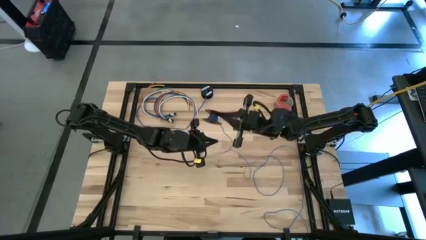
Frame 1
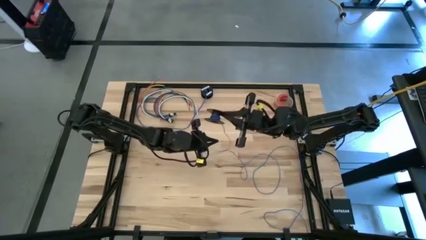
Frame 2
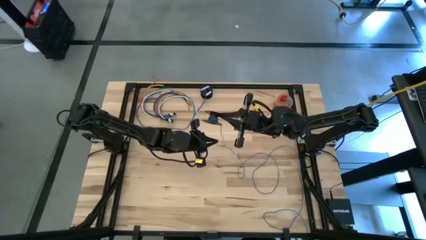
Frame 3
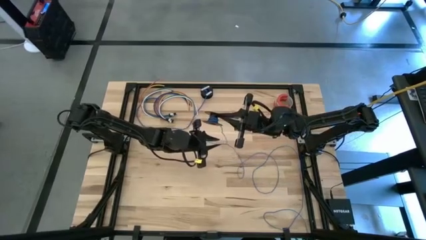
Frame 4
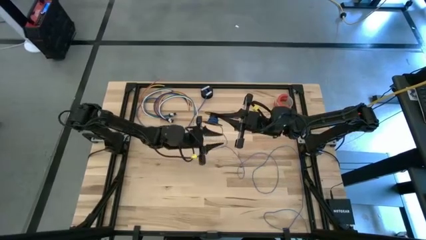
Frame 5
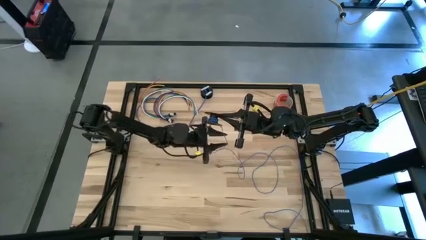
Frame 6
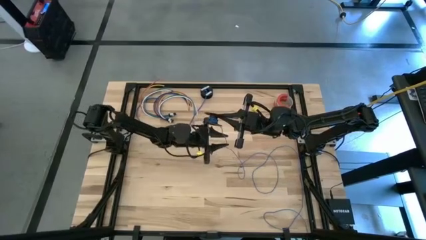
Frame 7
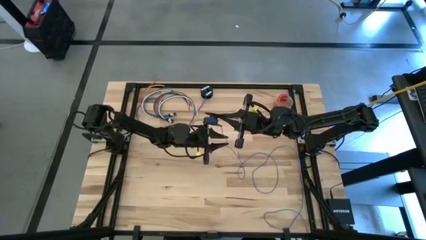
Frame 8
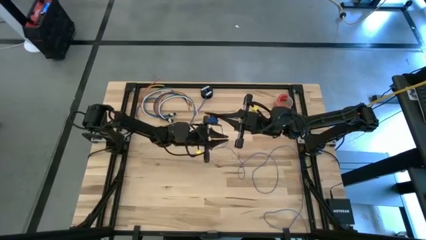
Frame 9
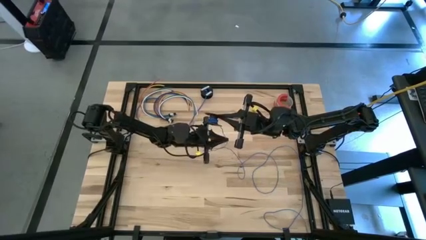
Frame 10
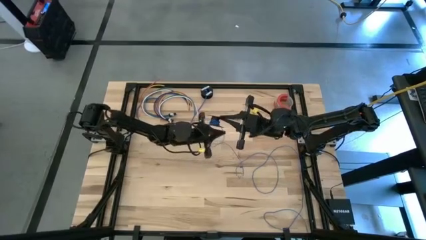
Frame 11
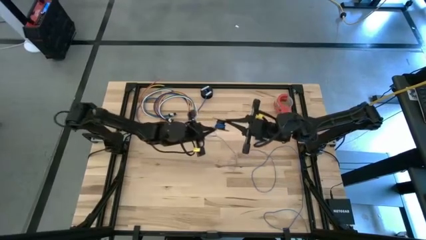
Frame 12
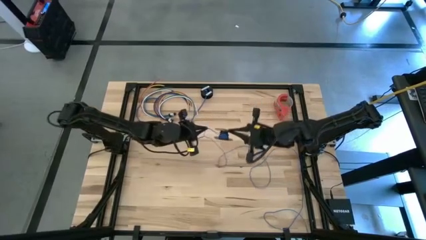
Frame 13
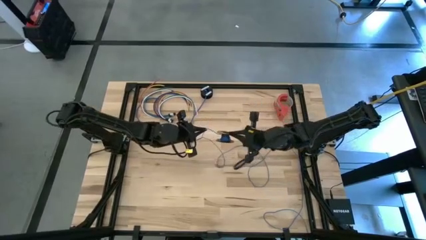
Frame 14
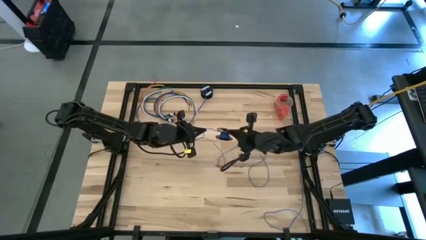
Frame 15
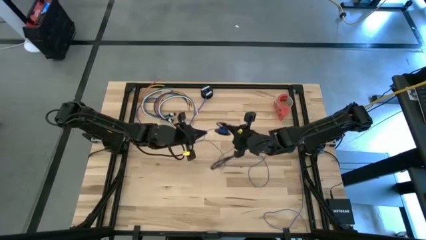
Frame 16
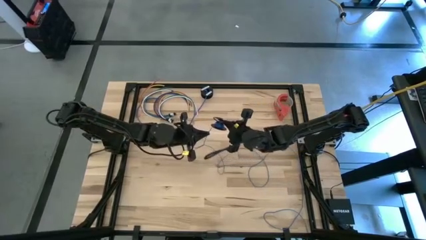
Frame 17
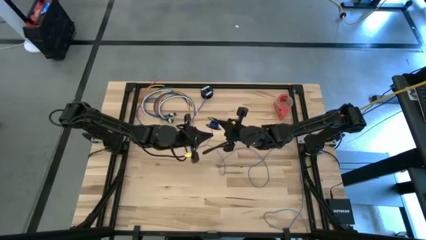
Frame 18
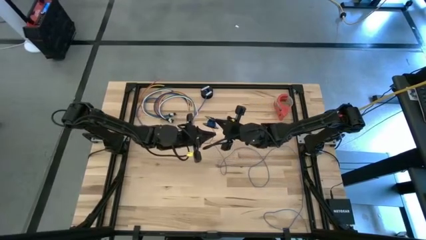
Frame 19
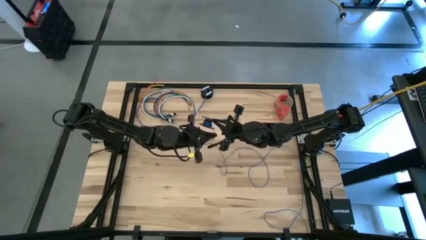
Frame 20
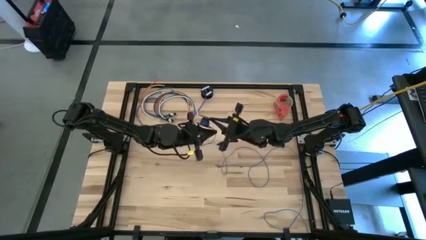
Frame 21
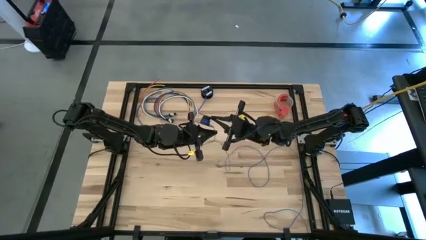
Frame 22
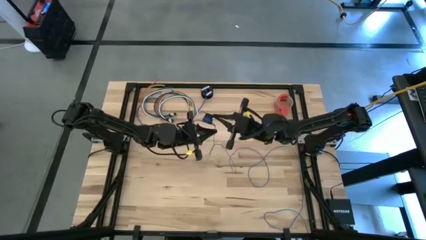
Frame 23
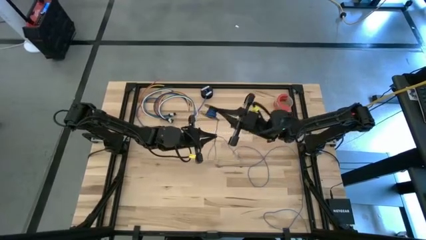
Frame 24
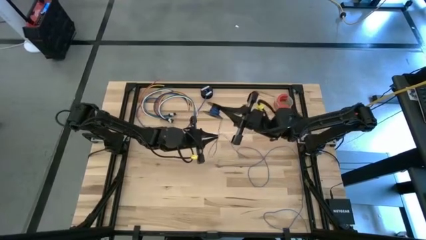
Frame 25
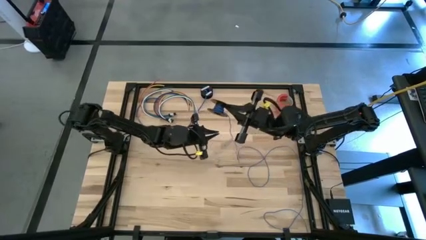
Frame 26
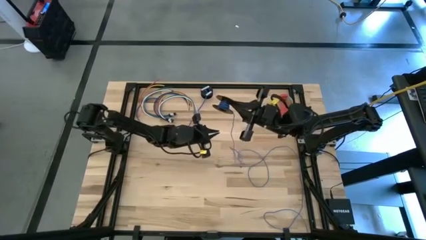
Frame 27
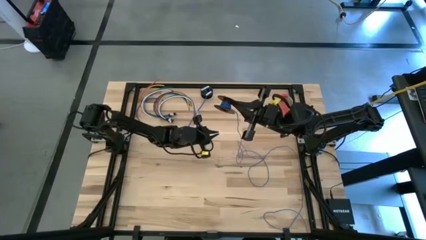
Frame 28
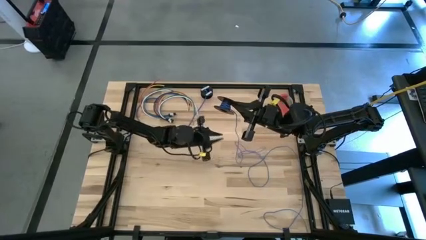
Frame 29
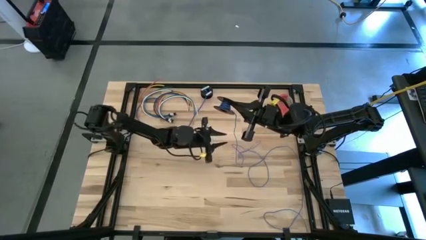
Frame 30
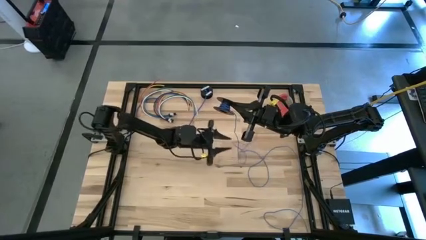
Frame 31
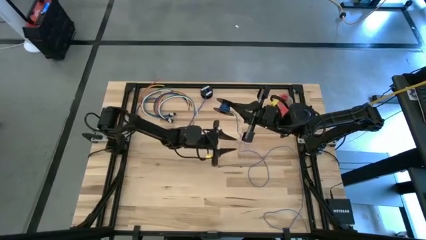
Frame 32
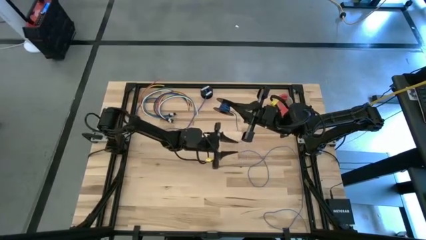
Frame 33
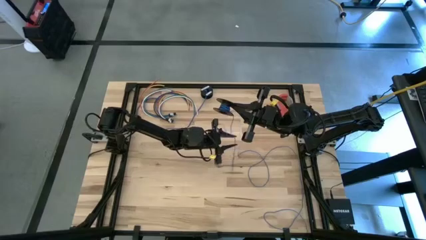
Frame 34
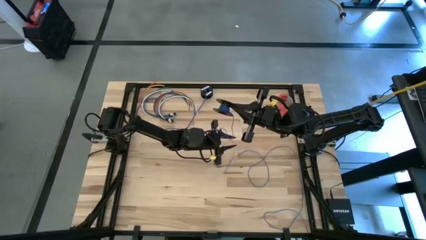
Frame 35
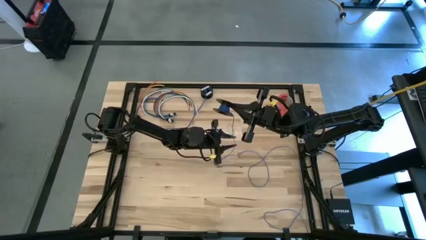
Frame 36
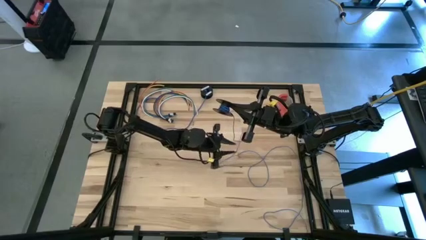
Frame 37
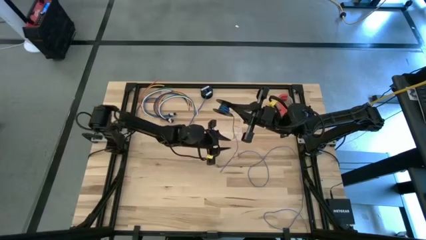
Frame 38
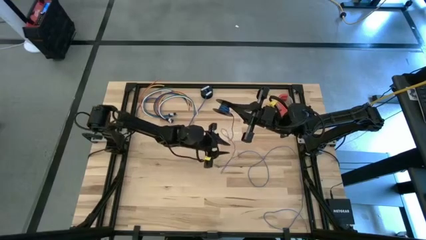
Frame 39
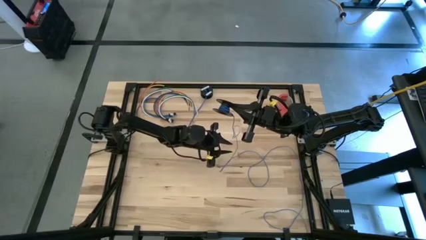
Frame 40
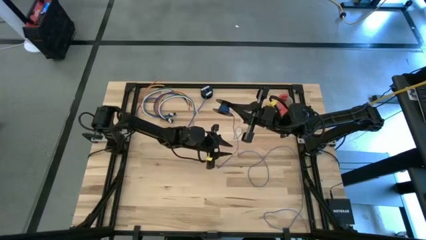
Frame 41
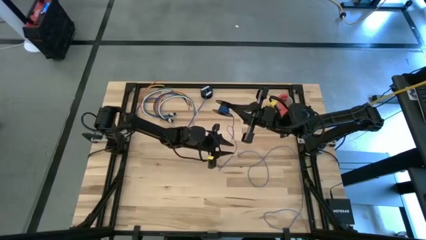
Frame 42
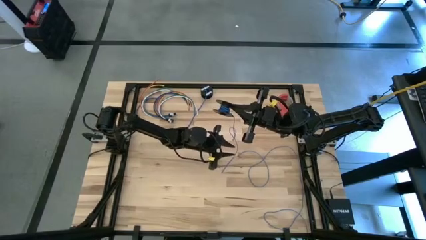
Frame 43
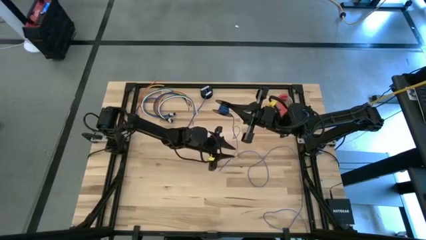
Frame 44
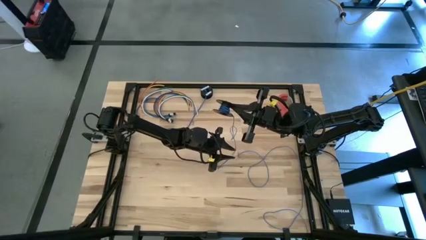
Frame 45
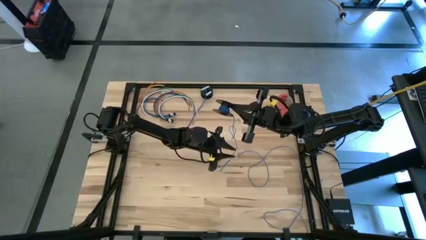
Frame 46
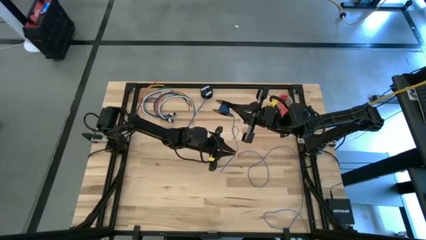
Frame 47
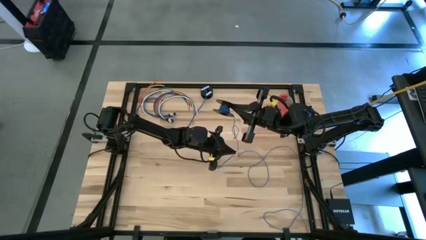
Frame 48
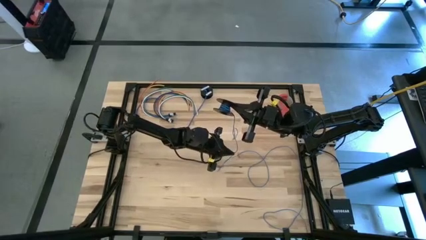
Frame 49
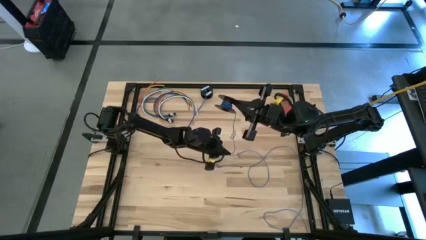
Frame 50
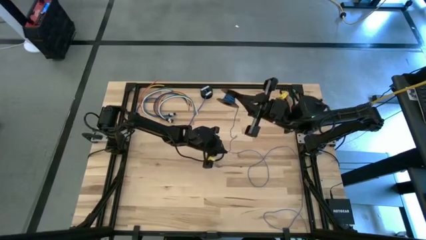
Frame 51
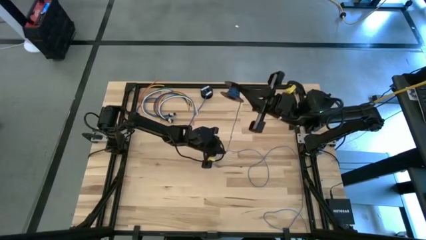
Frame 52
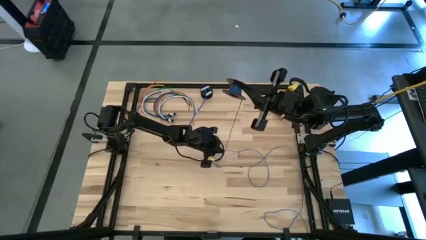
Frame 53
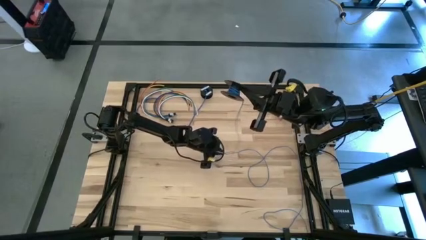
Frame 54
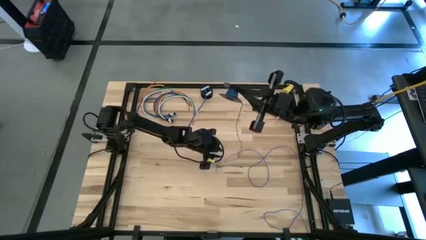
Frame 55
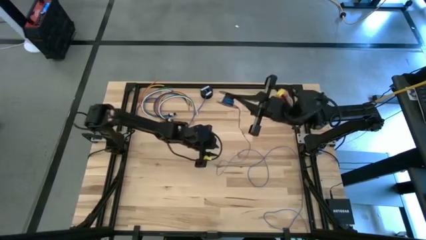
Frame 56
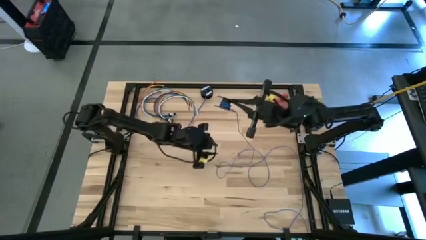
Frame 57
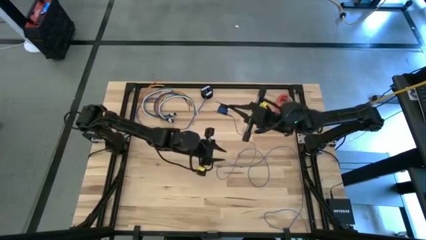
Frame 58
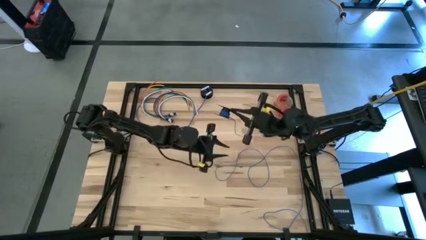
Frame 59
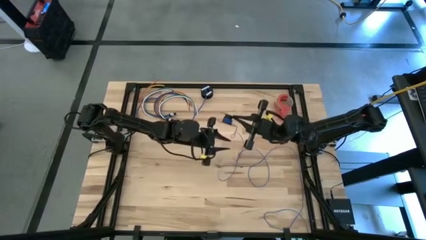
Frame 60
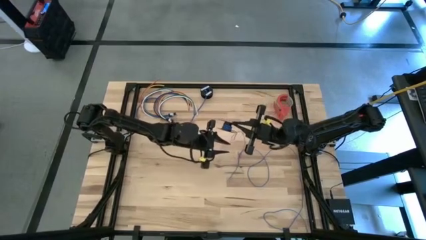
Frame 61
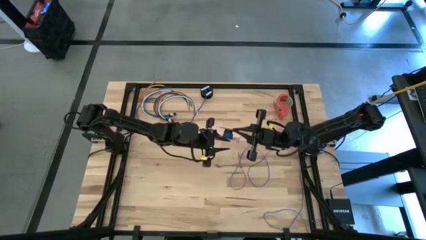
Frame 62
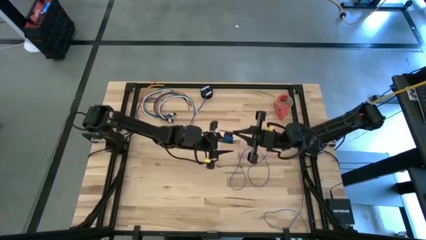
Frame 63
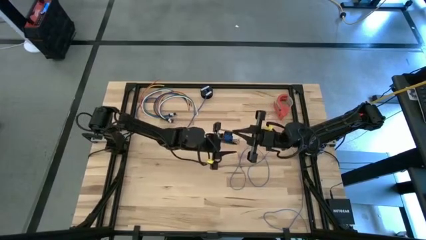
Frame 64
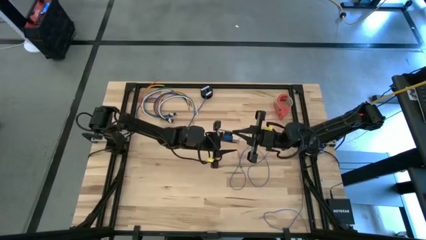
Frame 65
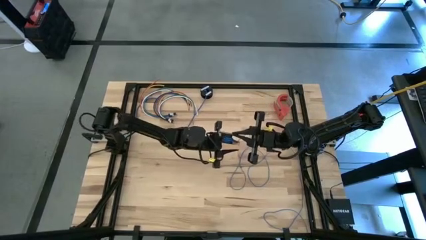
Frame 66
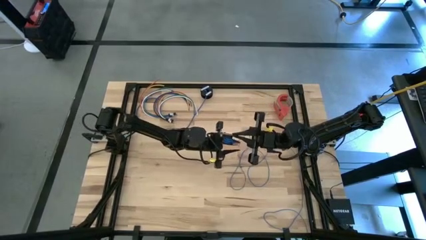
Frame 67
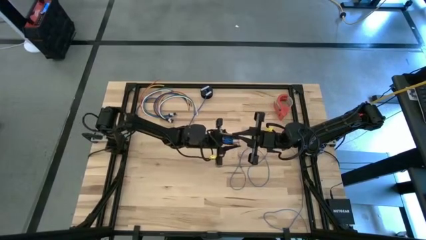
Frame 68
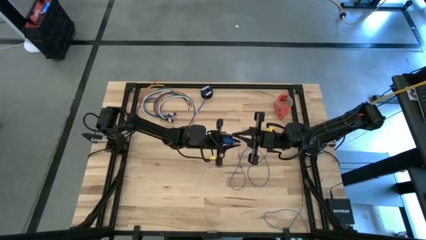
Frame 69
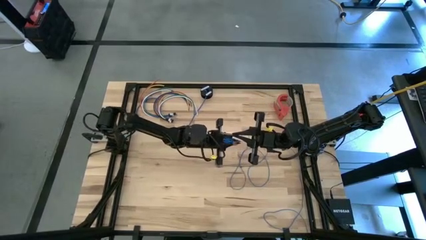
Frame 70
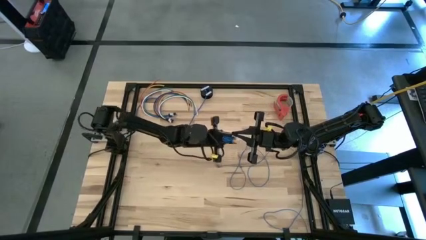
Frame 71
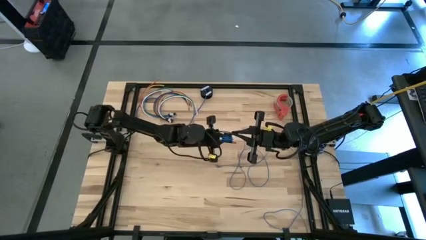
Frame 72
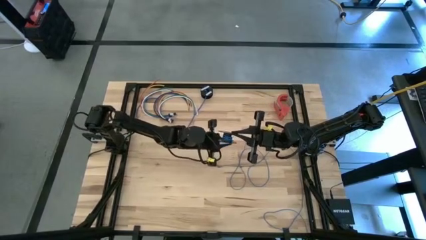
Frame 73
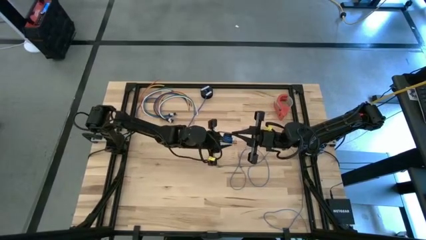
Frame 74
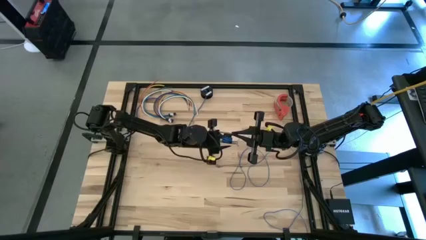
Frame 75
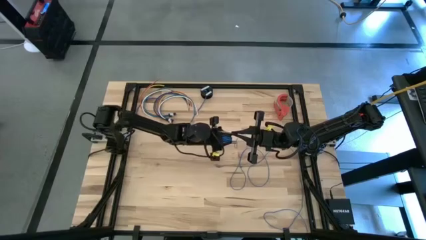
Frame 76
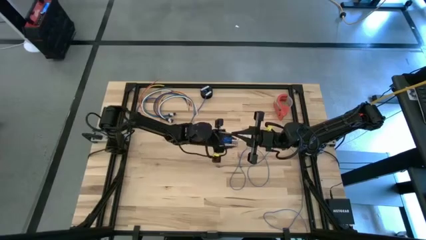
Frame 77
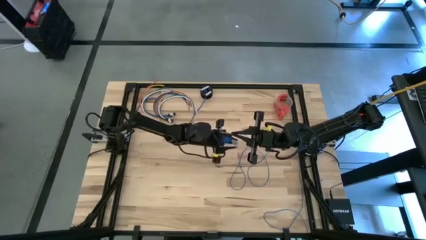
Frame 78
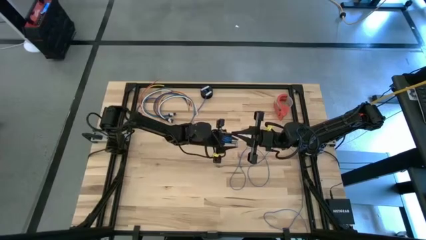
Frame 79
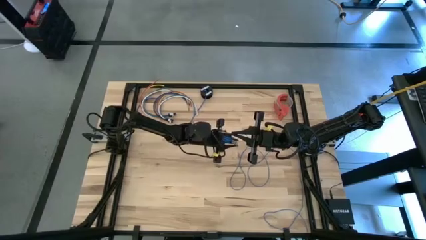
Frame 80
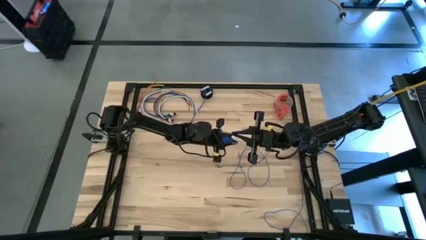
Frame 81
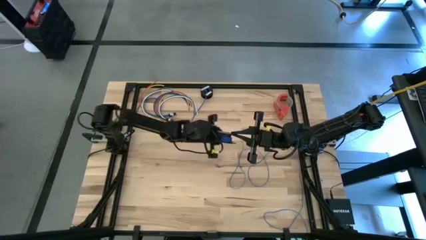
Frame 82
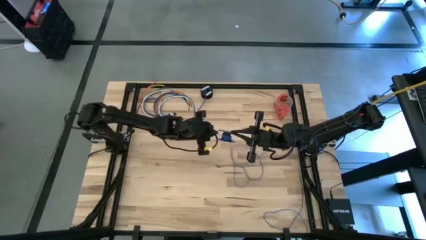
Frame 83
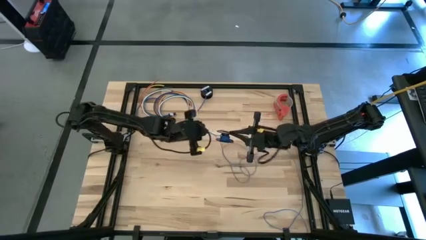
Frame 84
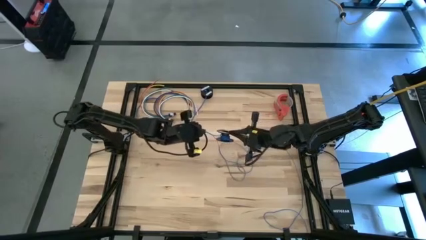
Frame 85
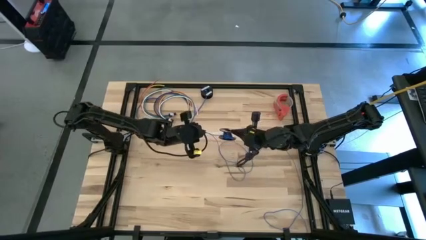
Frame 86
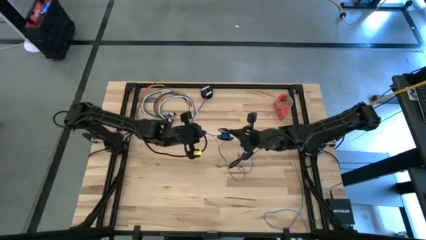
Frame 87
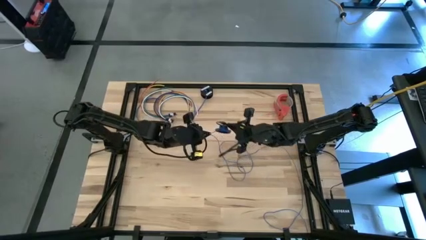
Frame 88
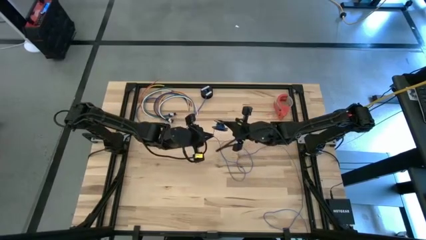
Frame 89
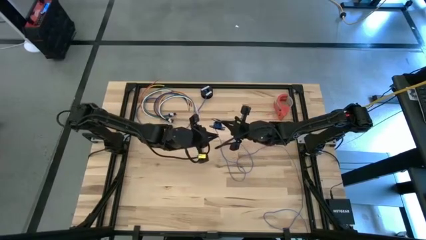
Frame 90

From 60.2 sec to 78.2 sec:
Task: Coil cords
Coil the blue wire onto the black spool
